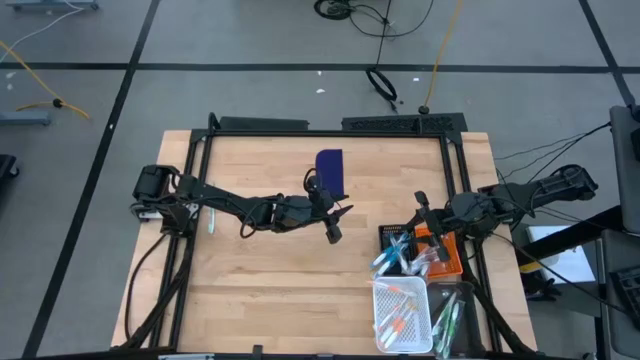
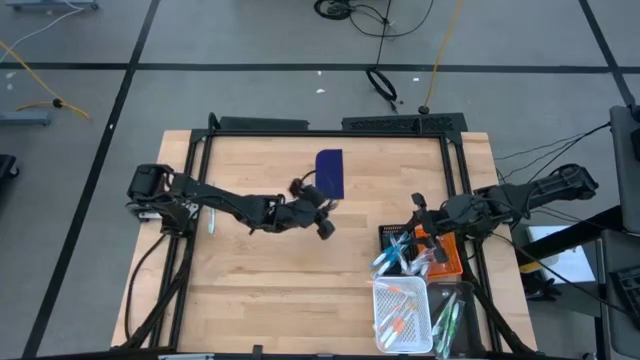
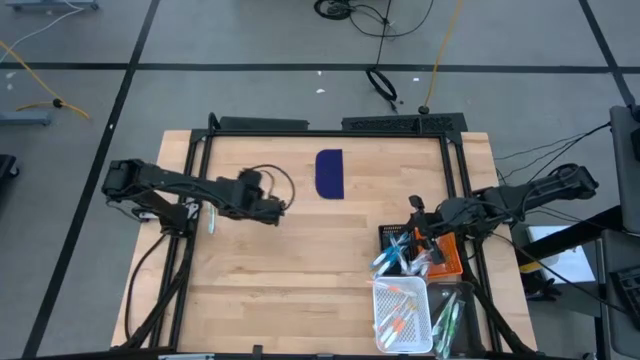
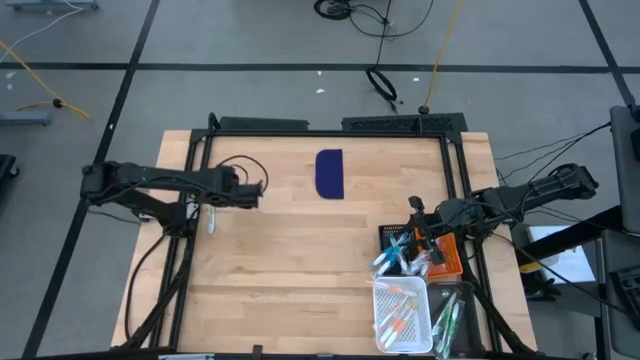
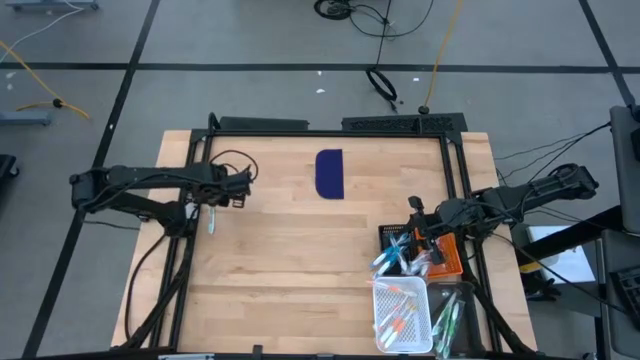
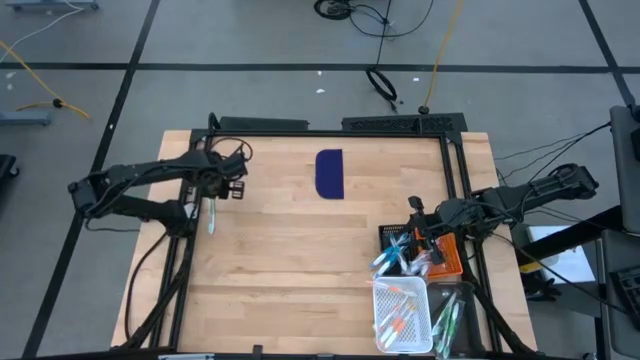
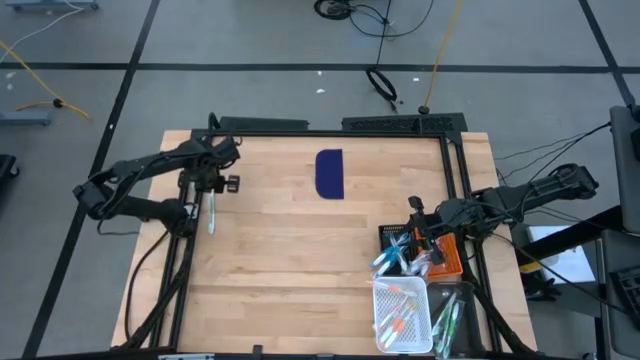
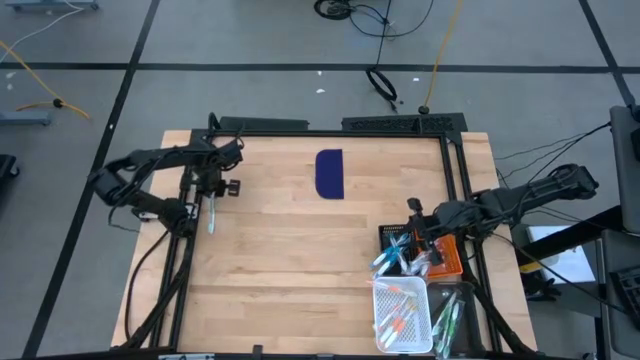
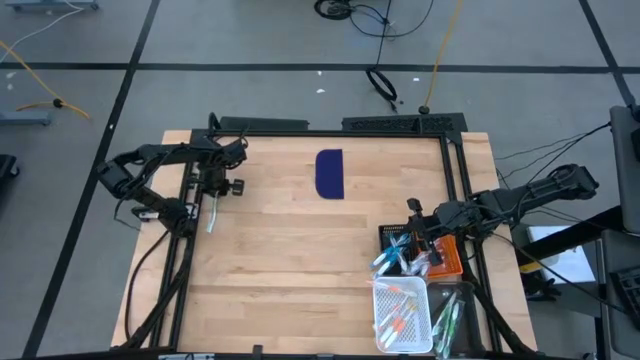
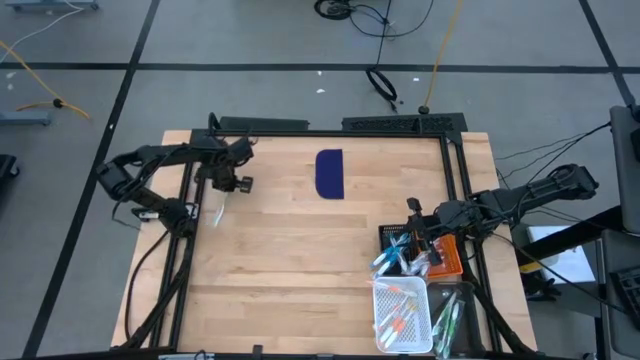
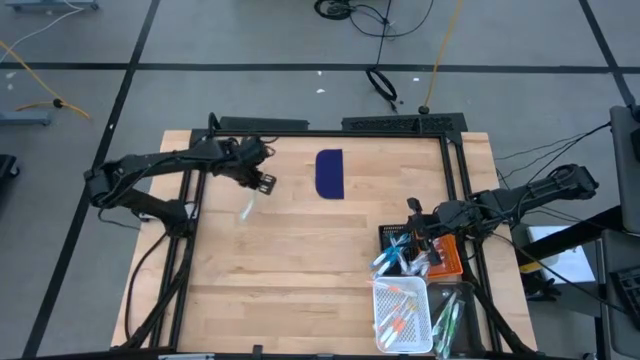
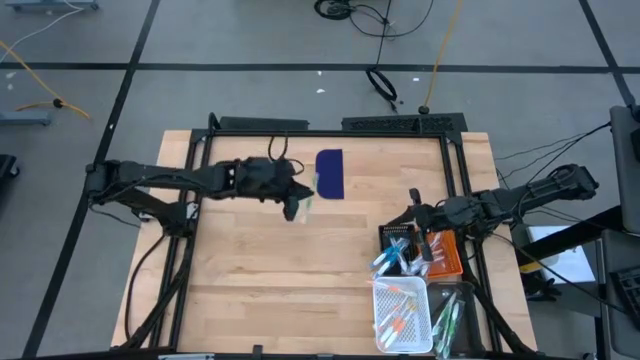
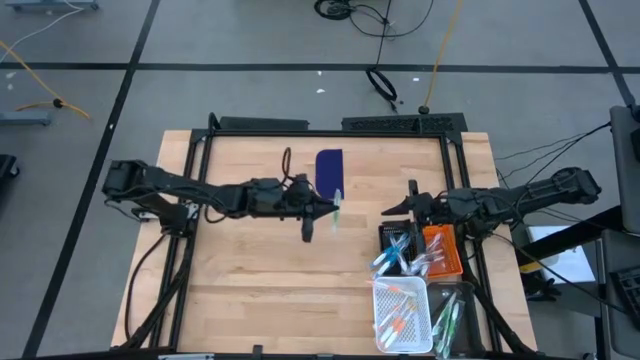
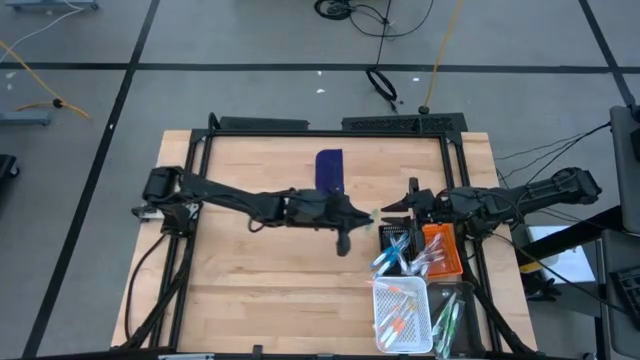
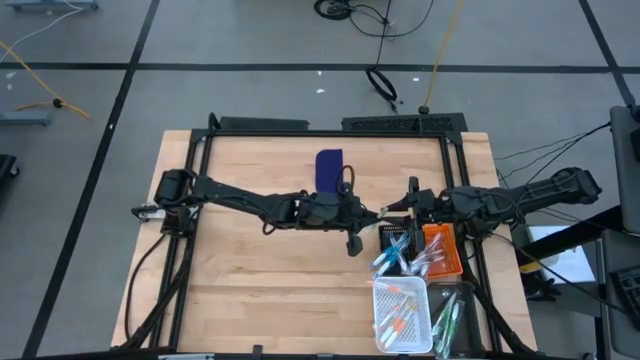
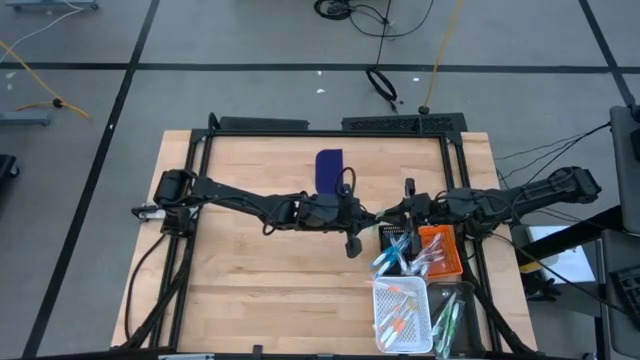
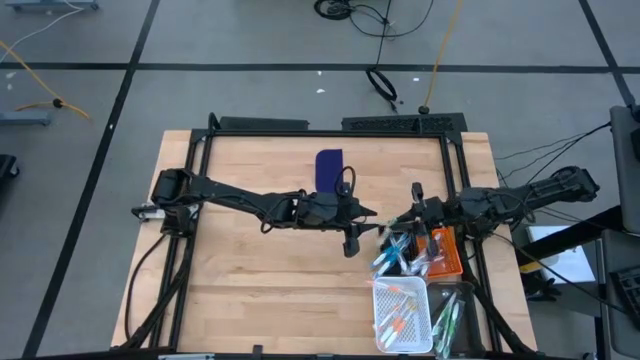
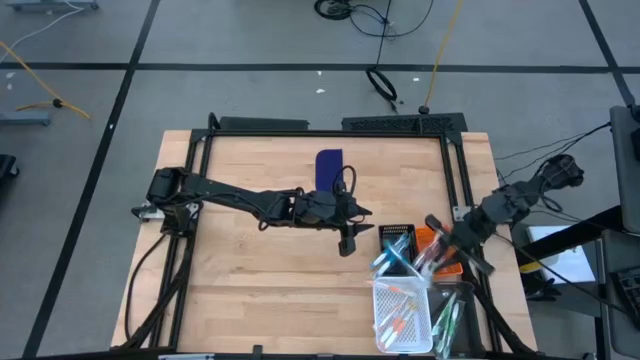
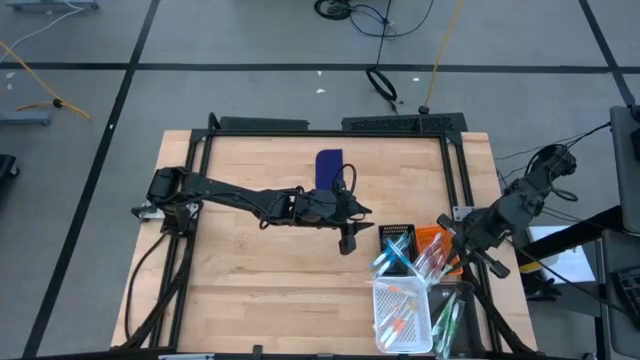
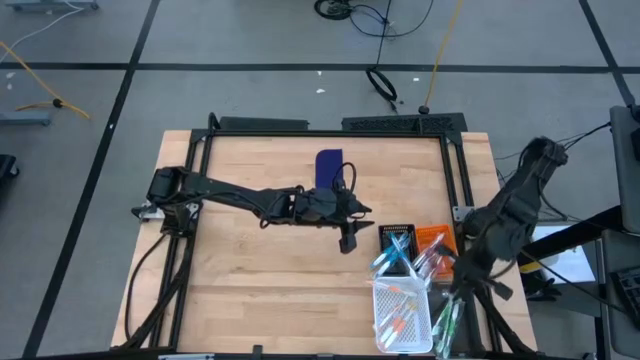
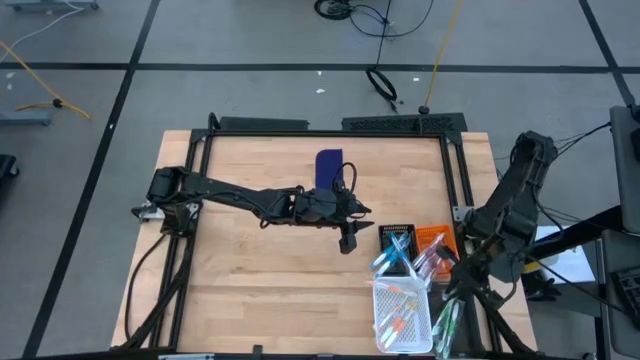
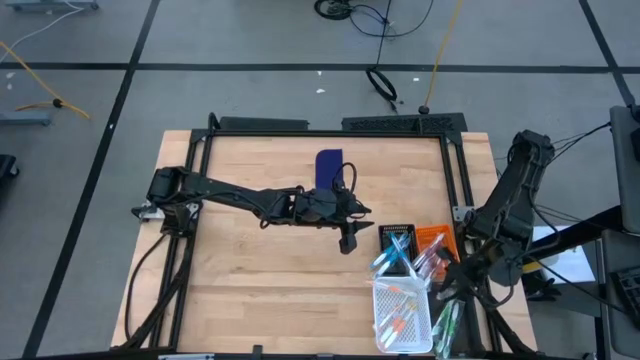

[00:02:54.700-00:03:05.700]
Task: Pick & Place Toothbrushes
Put the green toothbrush into the black bin

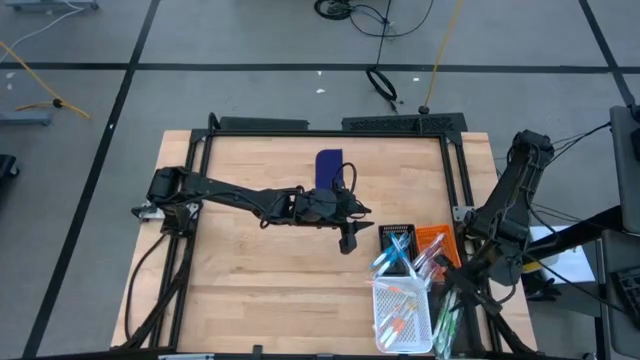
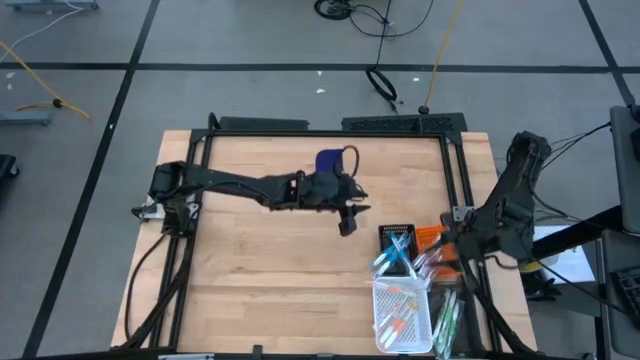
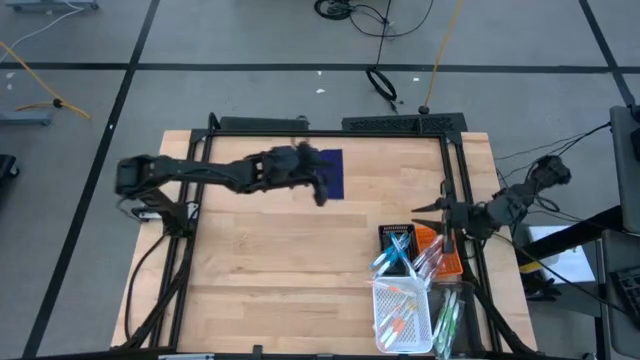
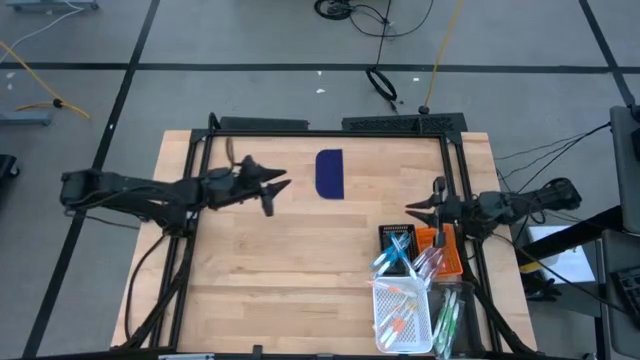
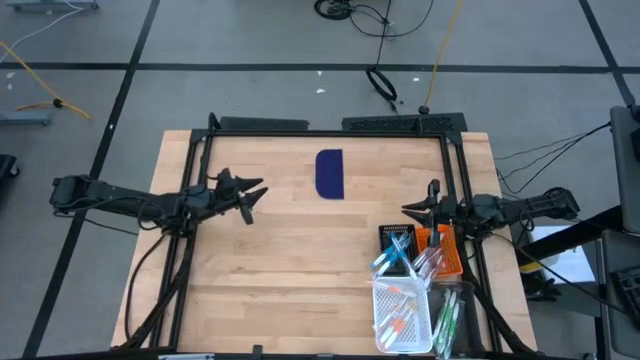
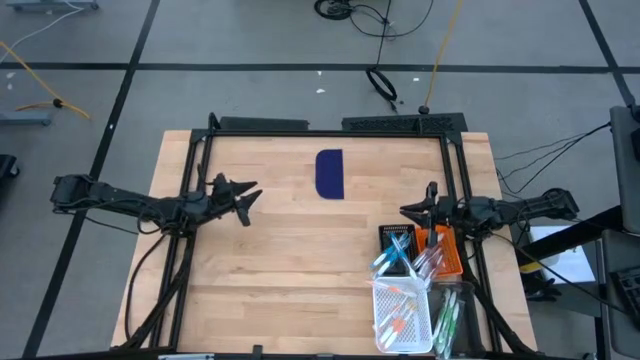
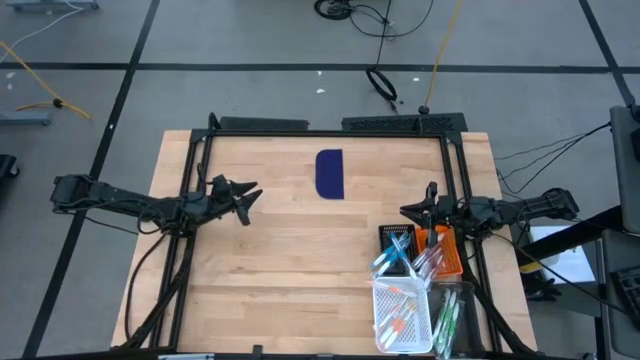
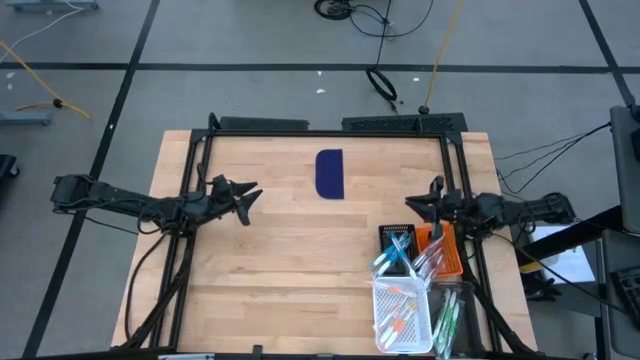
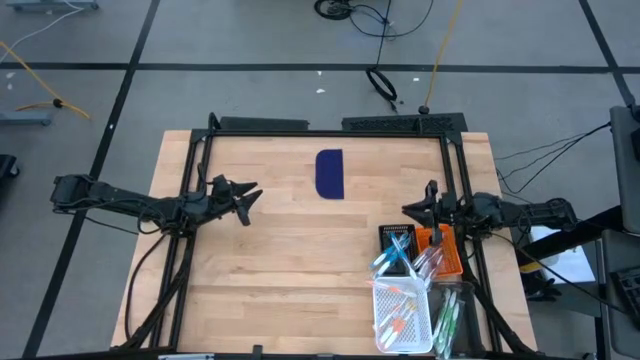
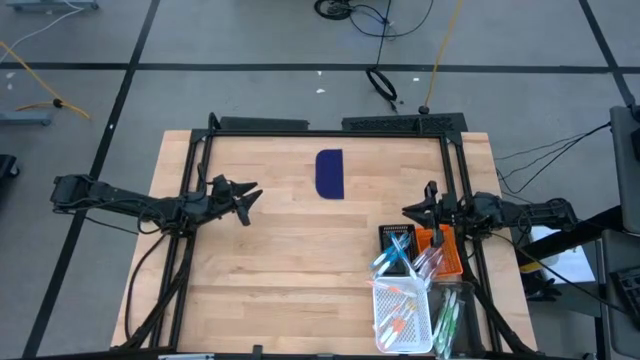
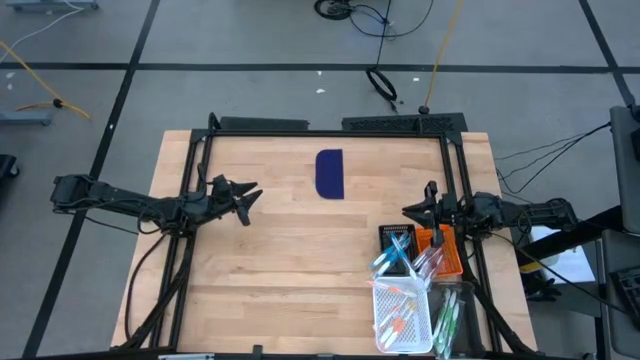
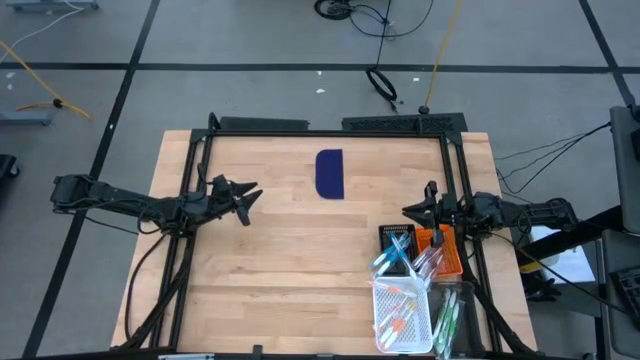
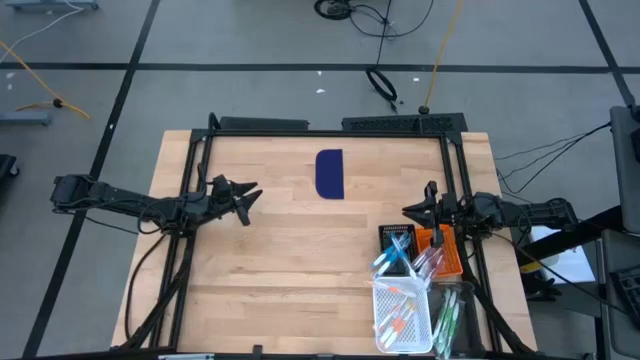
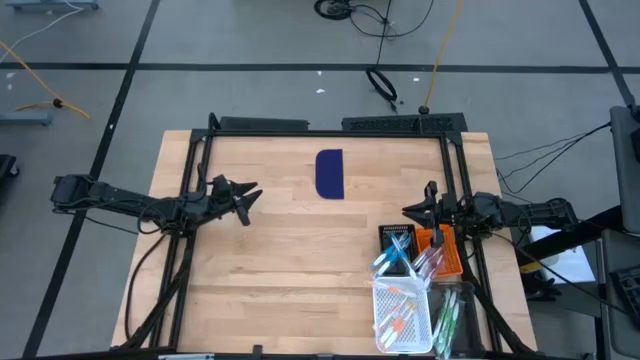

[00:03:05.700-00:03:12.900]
Return to Home Position
